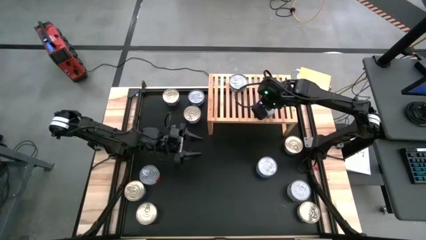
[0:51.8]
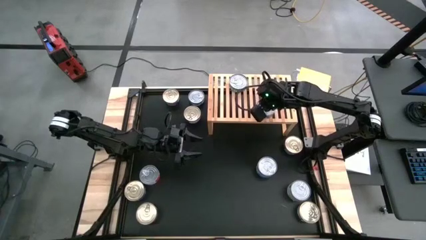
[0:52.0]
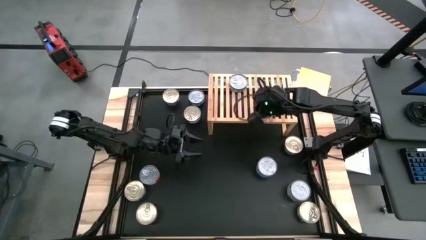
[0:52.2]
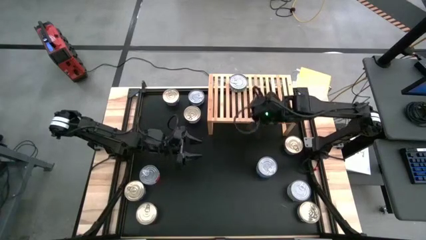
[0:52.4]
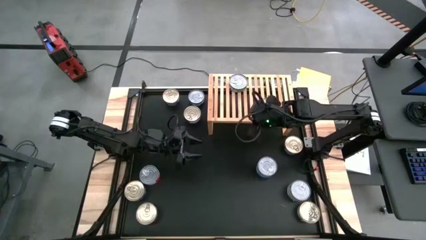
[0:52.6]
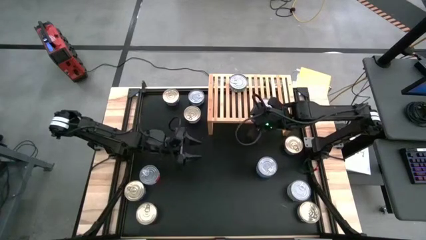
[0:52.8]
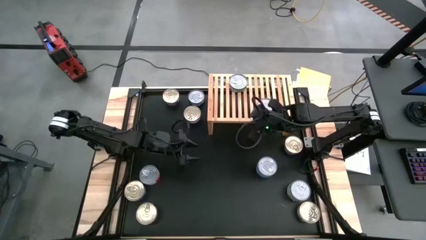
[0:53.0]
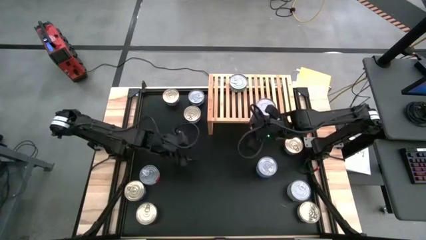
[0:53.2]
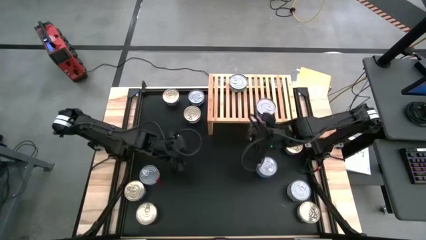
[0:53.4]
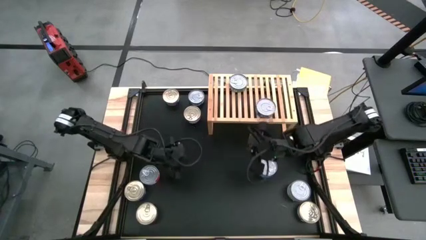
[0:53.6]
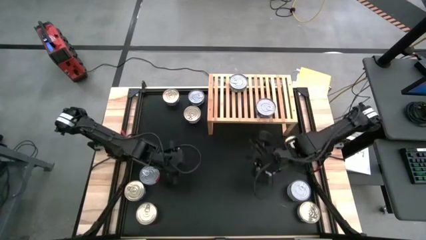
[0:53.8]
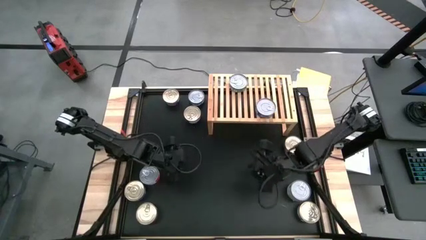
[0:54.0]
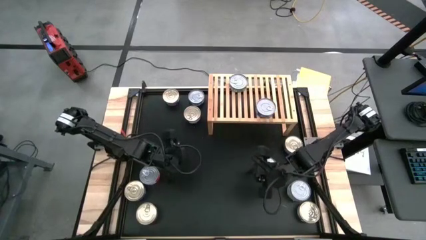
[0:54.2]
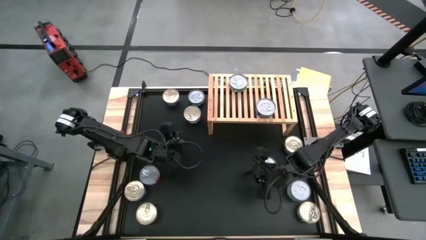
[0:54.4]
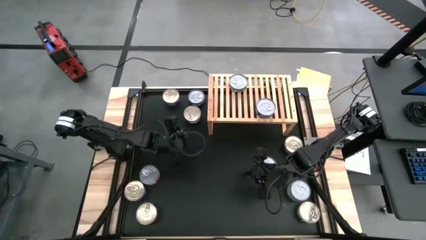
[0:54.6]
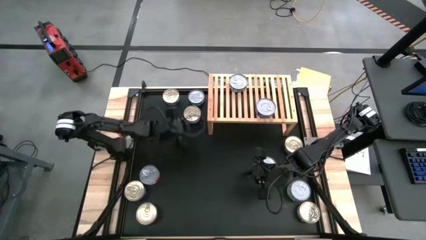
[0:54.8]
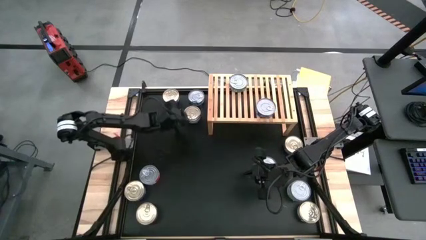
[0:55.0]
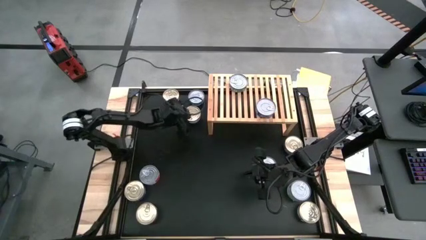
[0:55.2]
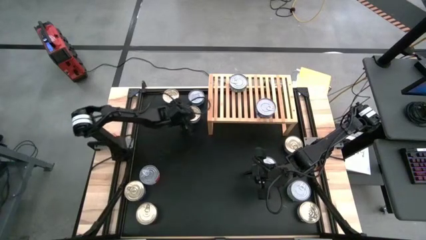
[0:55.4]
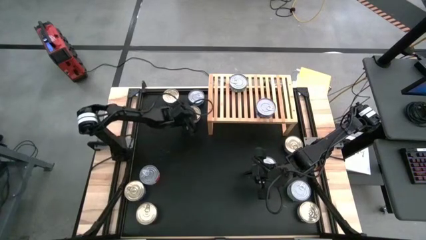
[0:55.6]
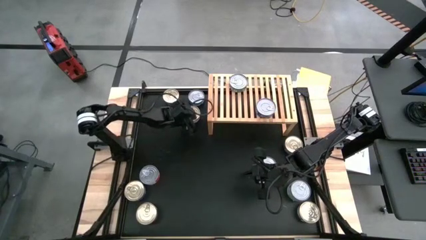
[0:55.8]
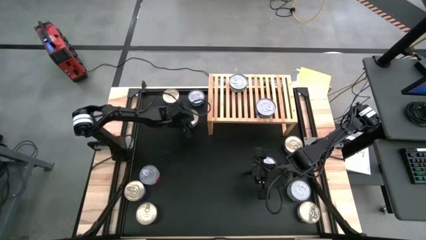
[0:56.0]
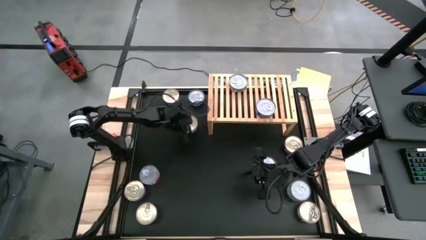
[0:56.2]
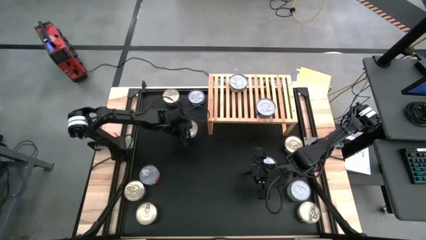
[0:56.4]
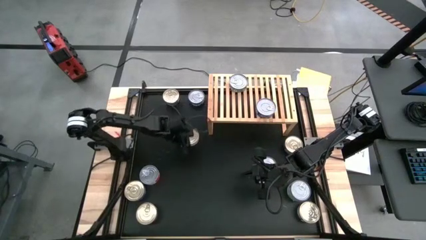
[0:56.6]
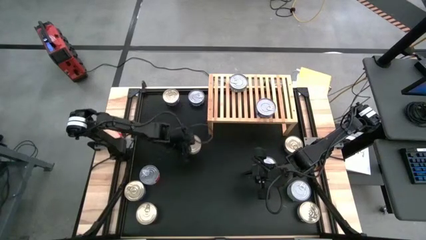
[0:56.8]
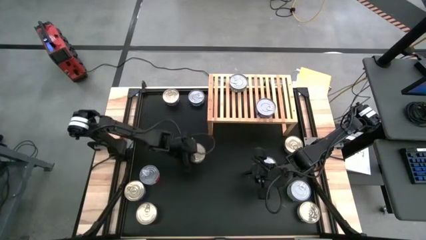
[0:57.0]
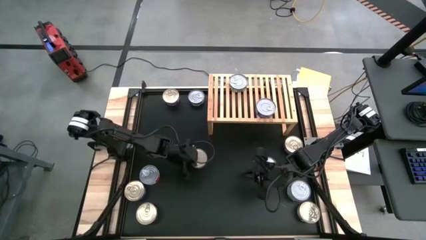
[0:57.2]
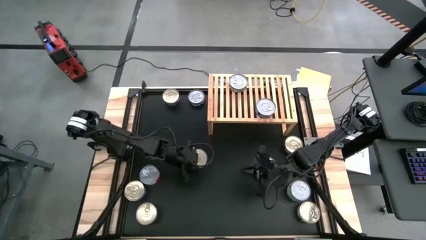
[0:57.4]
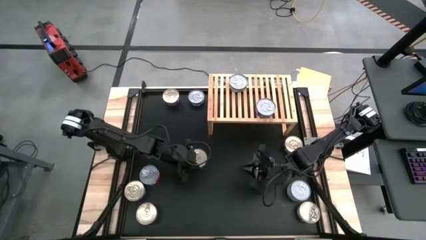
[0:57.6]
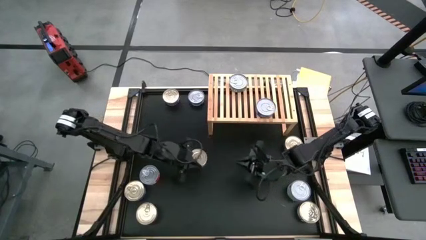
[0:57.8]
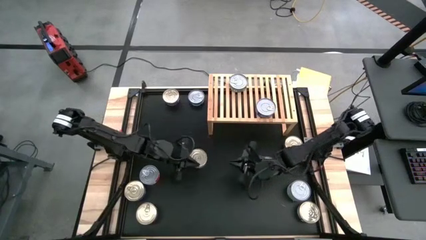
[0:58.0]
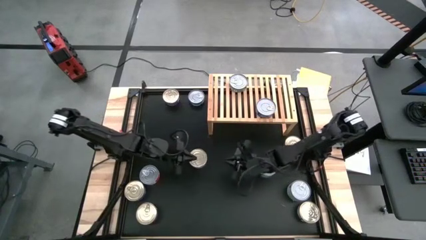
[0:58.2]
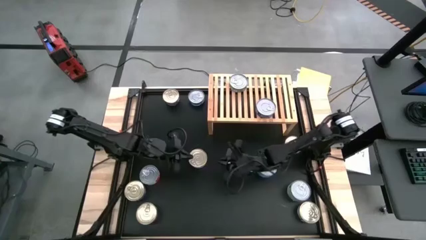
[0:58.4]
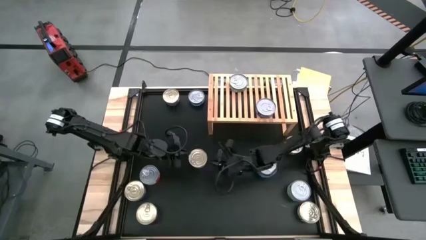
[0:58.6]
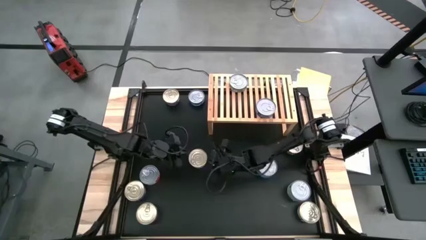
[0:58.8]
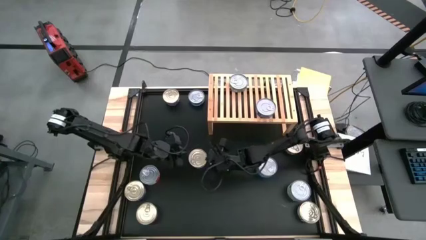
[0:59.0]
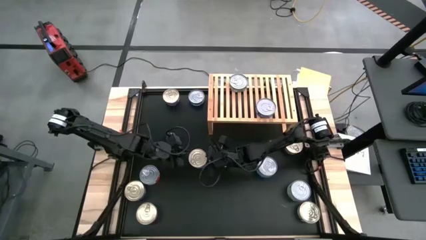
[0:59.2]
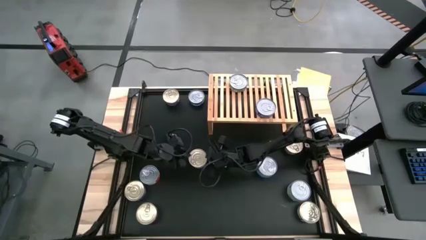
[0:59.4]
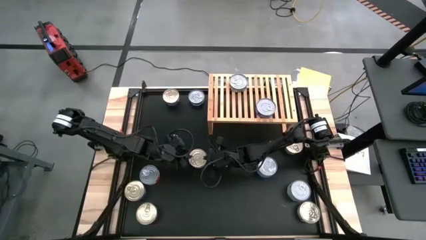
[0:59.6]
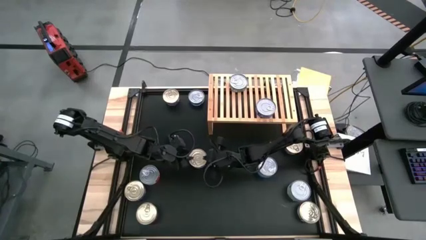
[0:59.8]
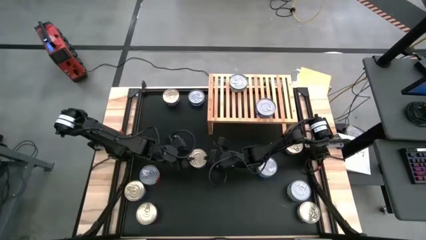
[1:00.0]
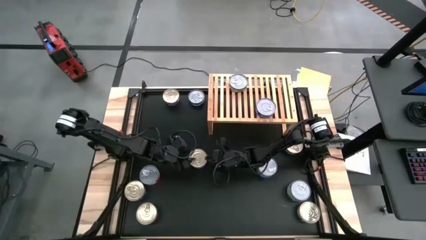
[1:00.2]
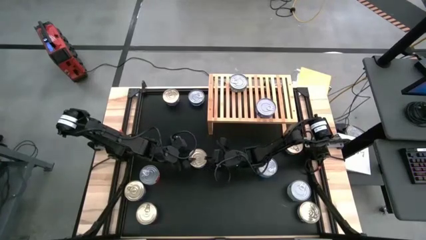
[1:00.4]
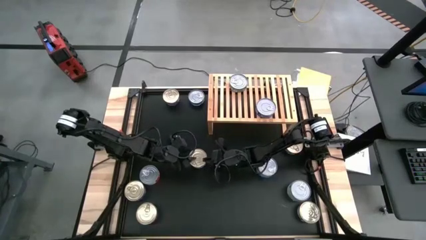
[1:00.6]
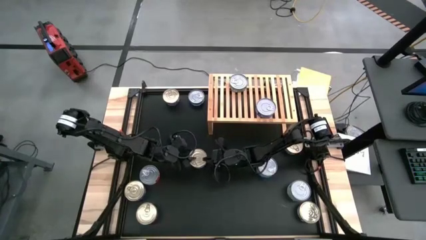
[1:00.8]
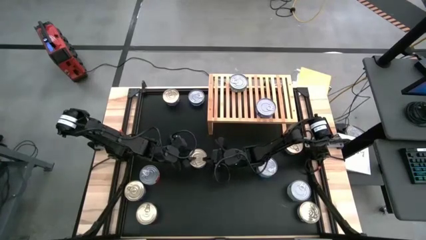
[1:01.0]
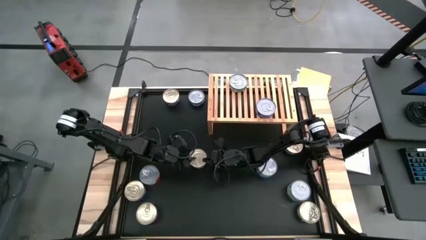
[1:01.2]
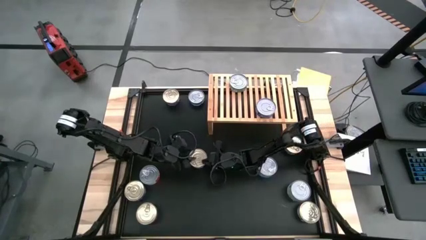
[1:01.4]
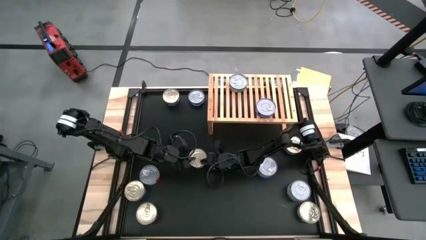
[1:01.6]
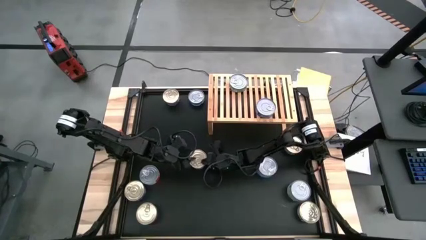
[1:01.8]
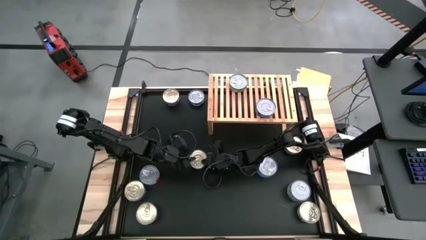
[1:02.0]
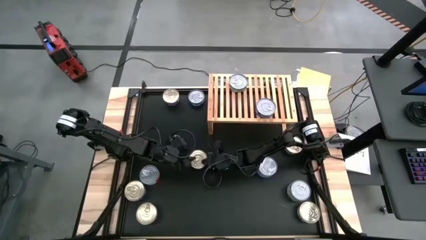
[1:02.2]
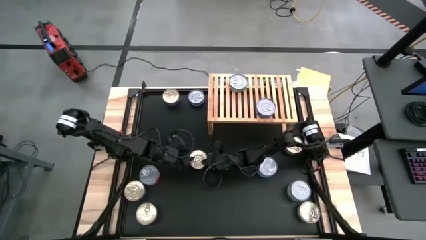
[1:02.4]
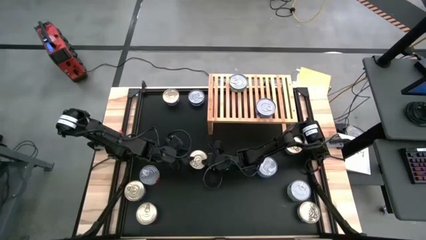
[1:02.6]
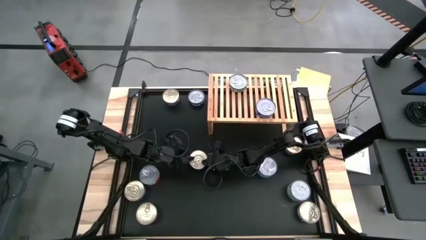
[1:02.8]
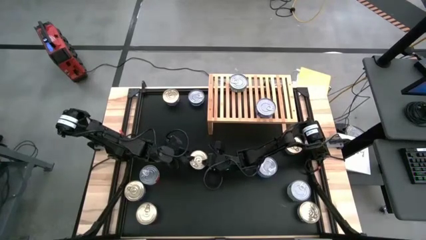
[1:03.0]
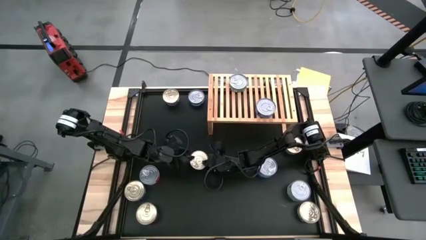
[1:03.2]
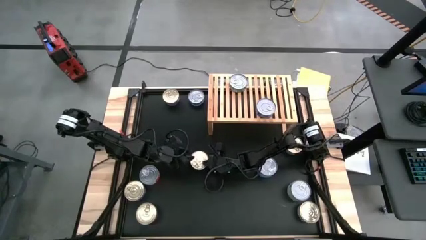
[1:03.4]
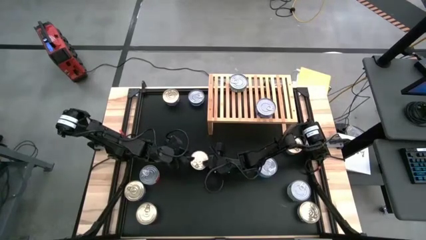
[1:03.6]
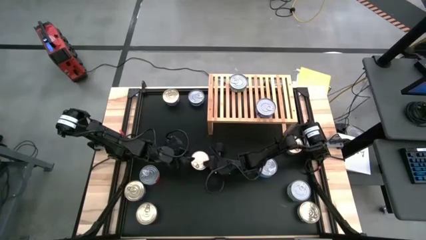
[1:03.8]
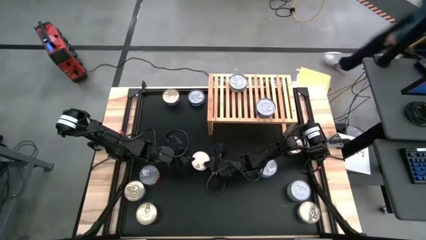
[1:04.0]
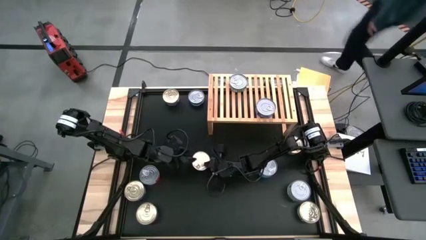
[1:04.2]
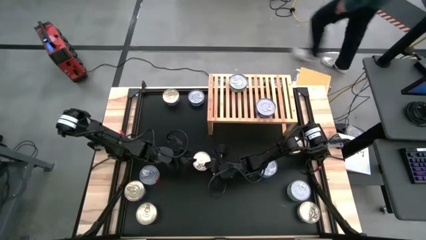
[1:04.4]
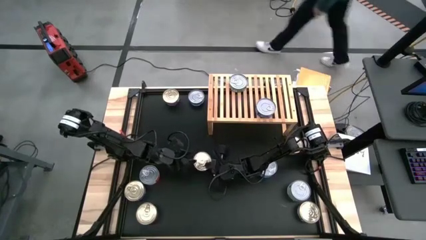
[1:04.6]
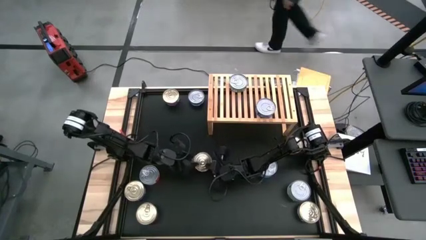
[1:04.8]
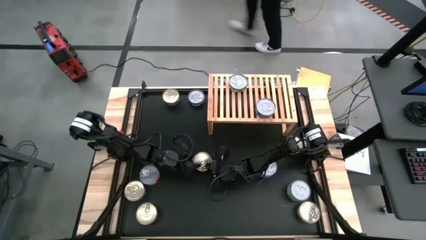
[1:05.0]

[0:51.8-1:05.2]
Task: Stack canned seafood by type on shelf
Put the blue-pink tuna can on the shelf
